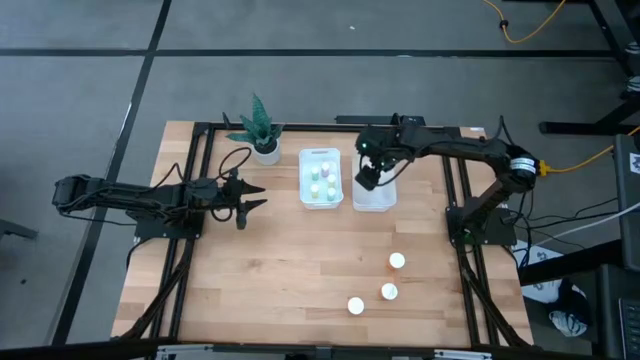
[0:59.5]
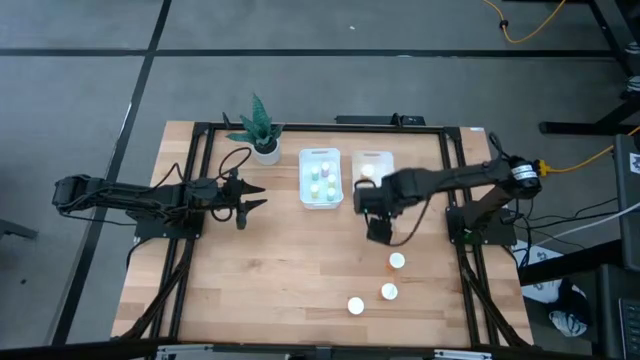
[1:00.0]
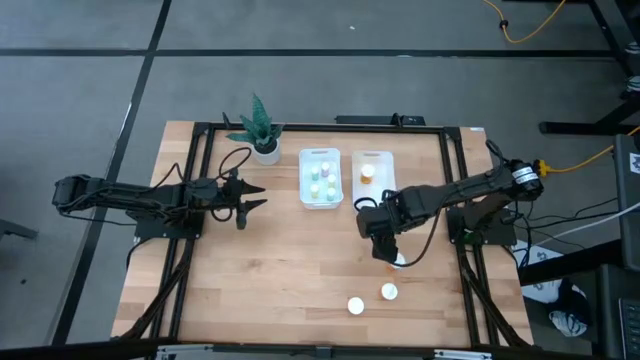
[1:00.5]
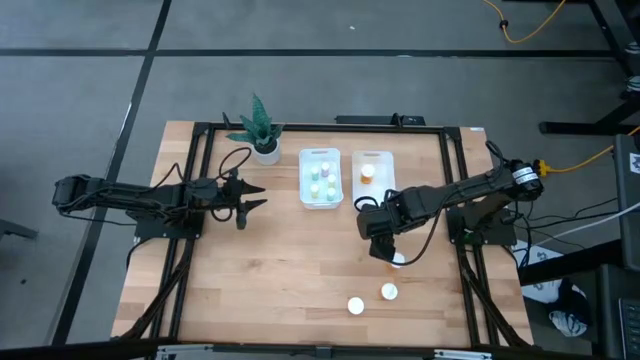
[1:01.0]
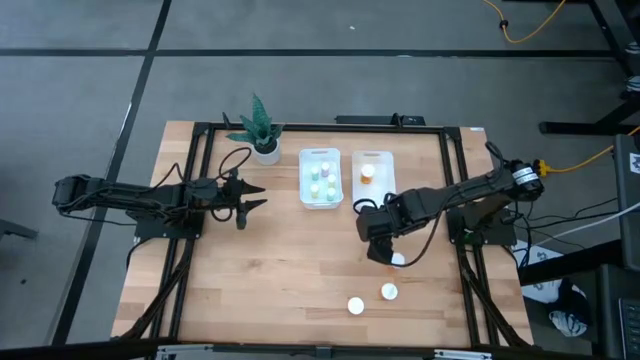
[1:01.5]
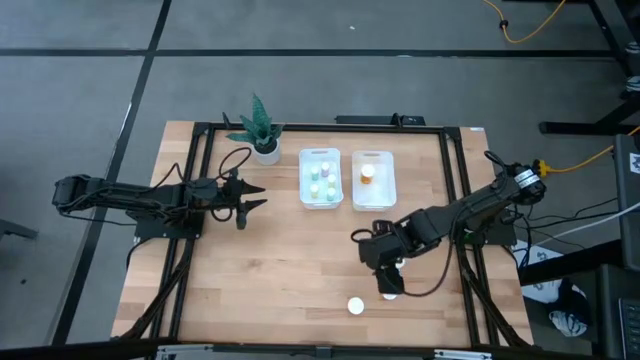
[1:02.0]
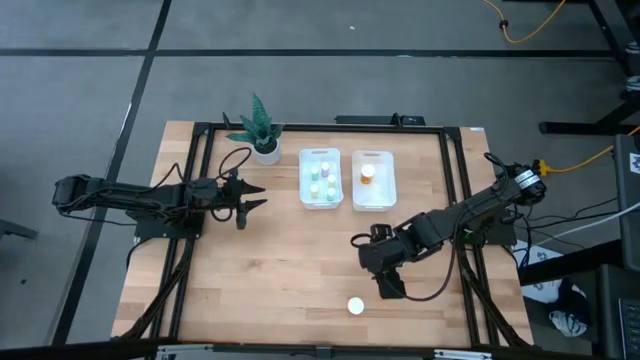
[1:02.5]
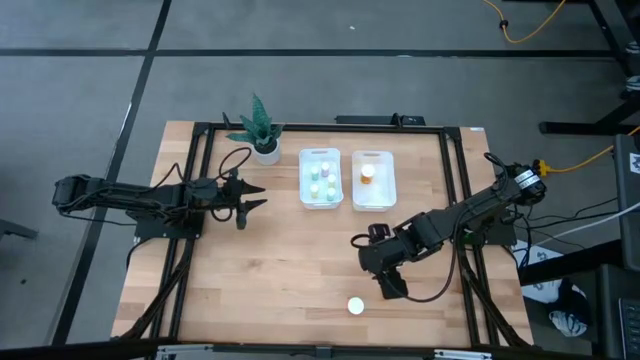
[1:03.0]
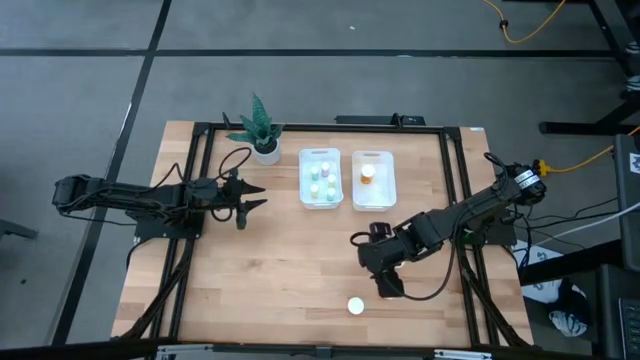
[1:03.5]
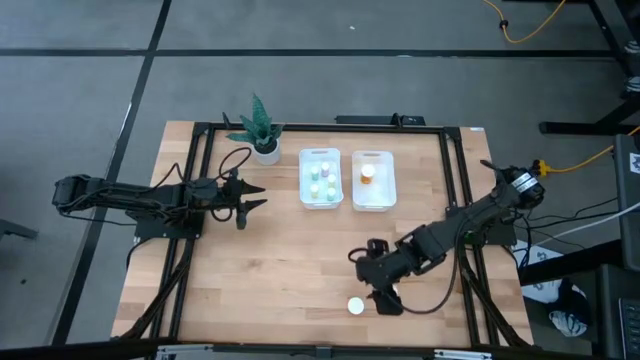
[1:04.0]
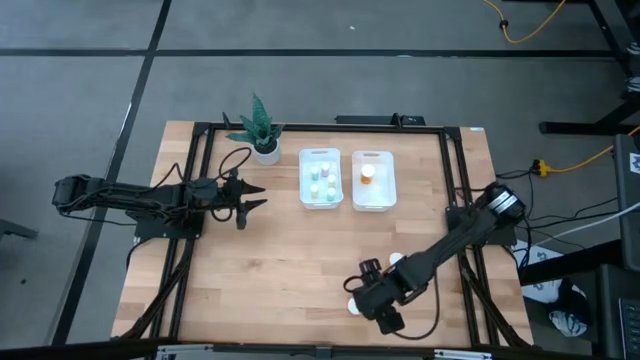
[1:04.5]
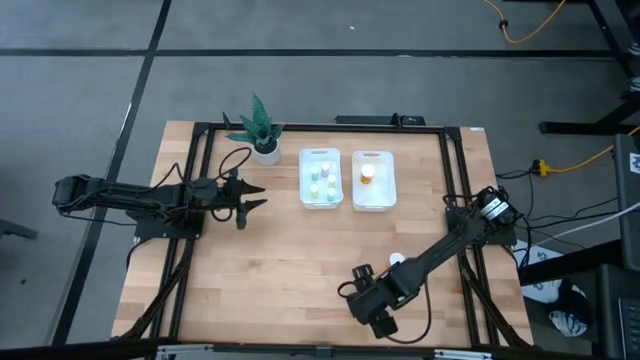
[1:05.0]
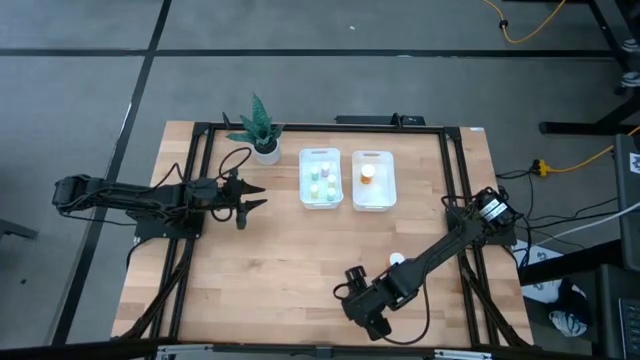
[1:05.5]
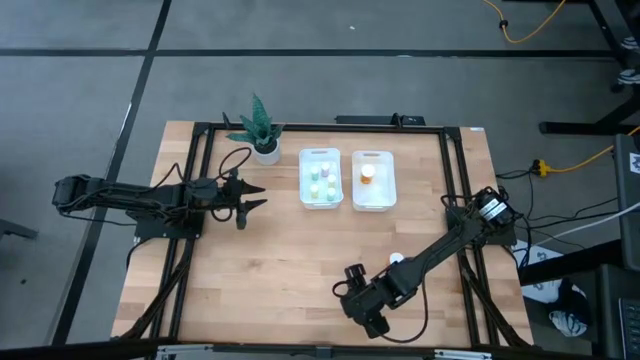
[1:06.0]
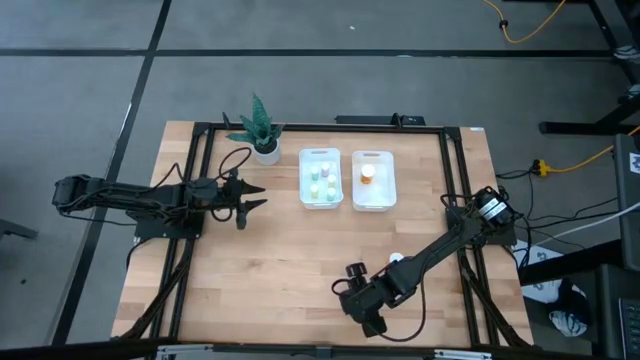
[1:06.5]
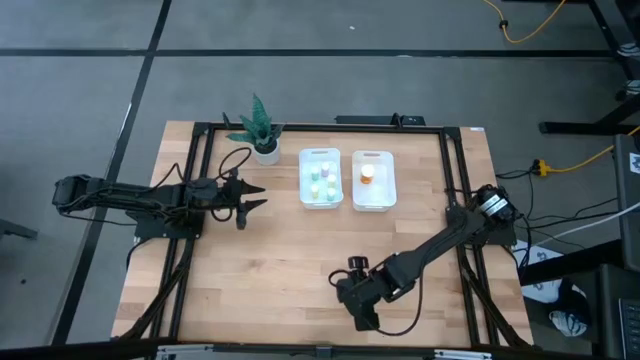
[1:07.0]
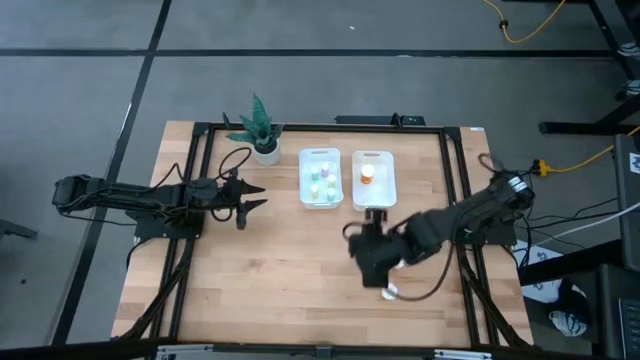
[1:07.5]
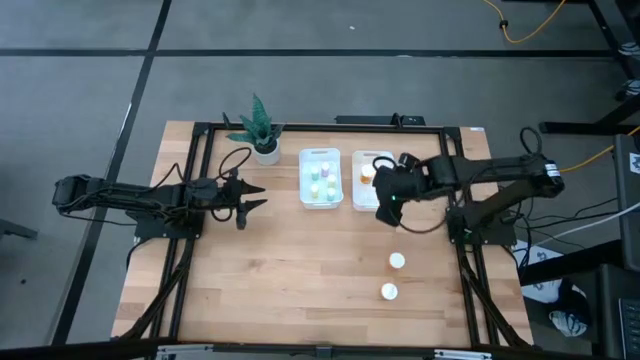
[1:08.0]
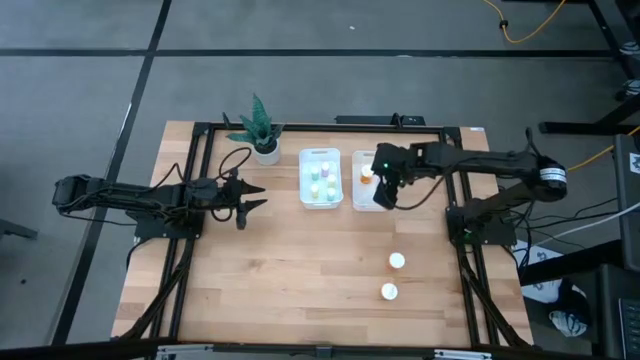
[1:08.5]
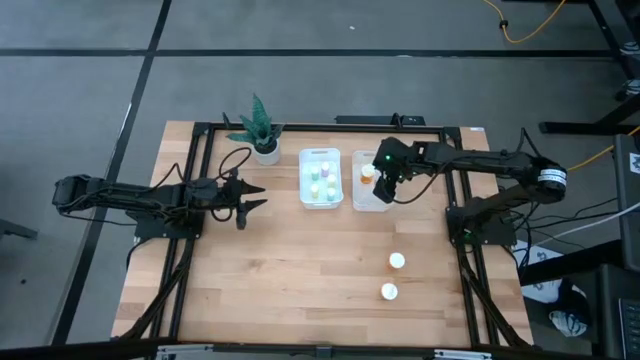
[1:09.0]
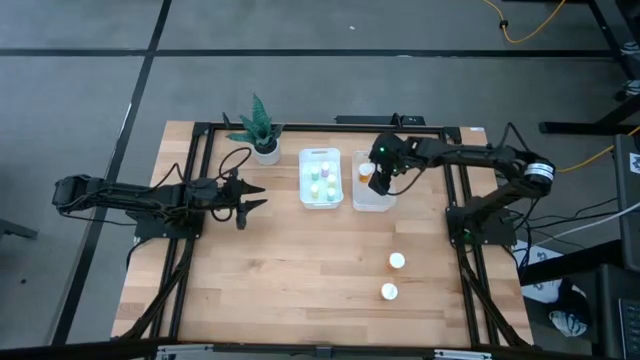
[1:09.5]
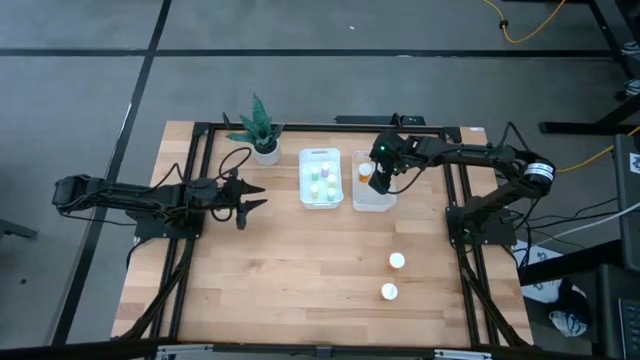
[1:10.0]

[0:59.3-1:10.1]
Task: Pick and place medicine bottles into bin by pill shape (circle, oval)
Put the orange pill bottle into the right white bin

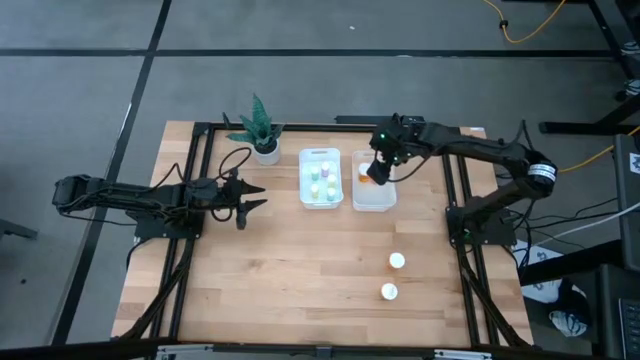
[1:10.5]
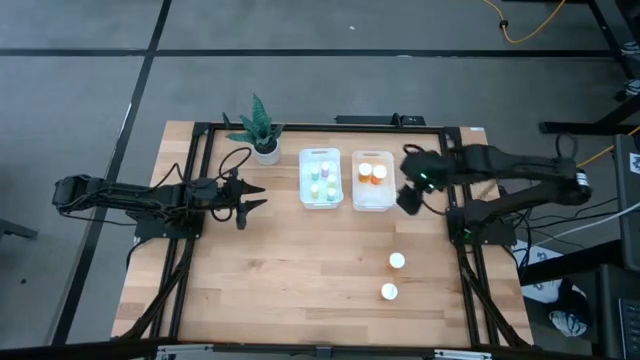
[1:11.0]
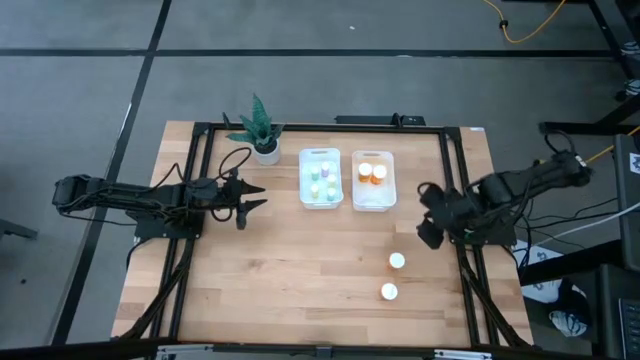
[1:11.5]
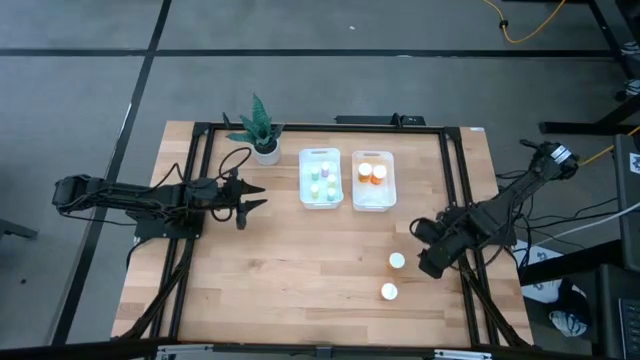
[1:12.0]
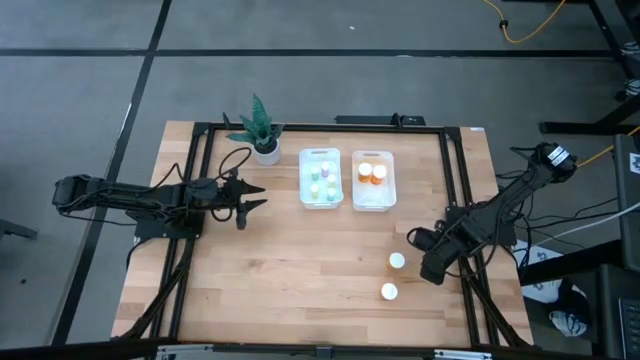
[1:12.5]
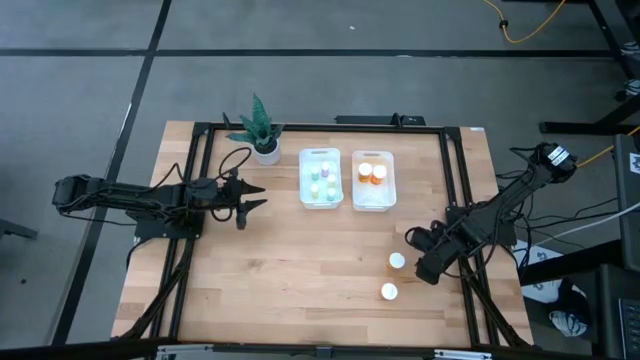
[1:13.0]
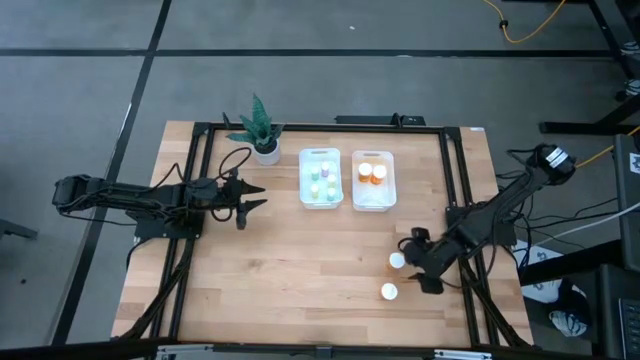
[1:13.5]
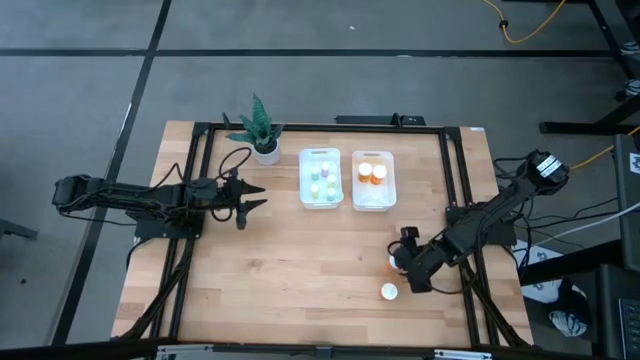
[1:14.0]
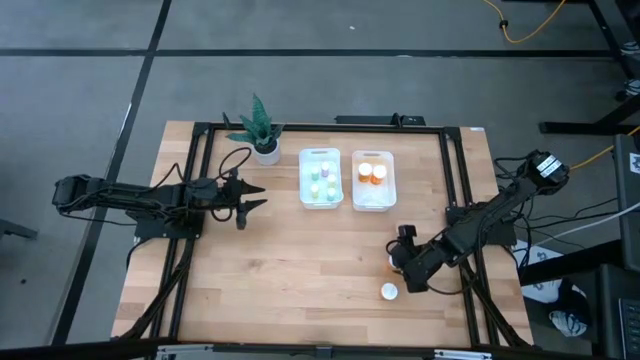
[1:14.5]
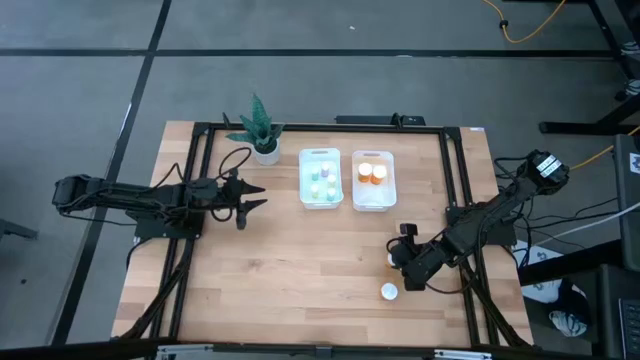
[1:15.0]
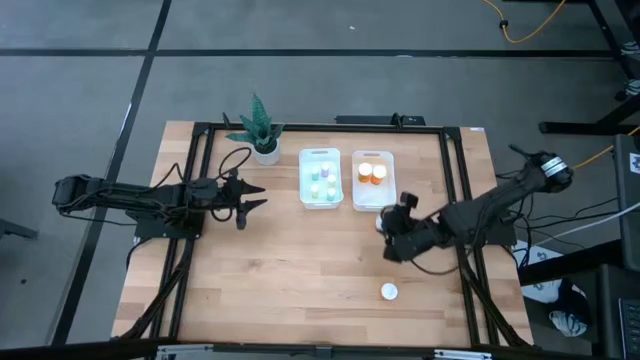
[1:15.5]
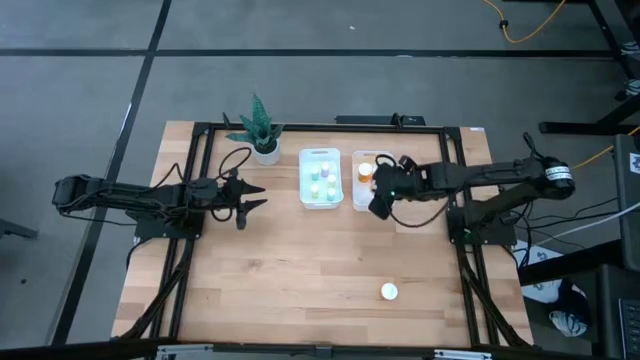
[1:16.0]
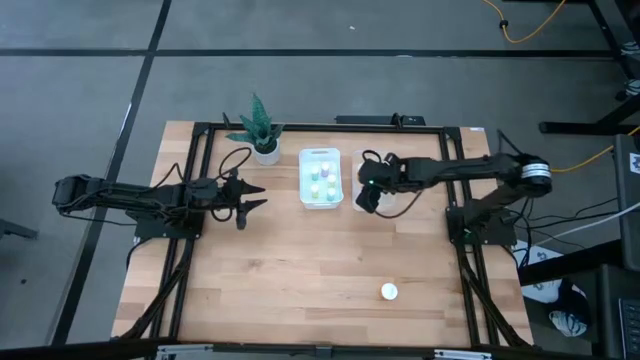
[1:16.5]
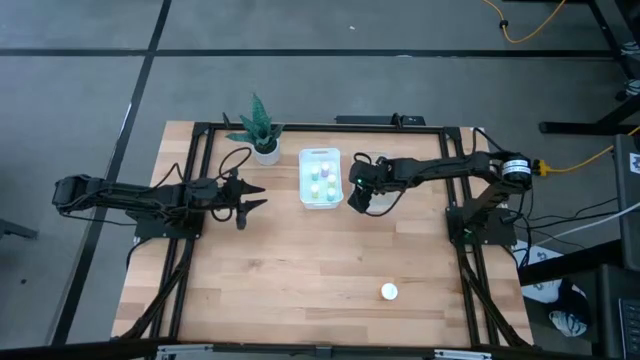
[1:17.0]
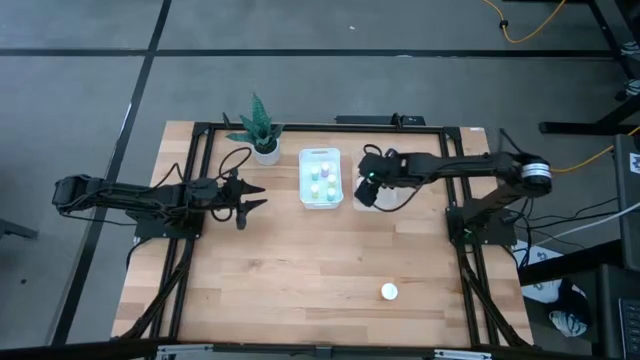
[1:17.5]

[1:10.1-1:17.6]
Put the orange pill bottle into the right white bin

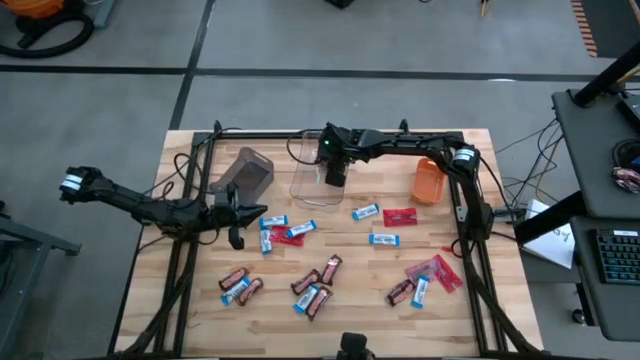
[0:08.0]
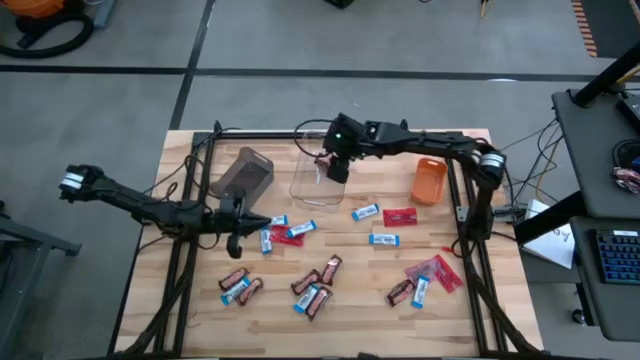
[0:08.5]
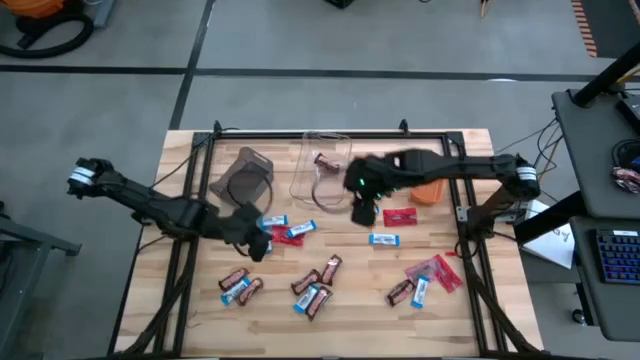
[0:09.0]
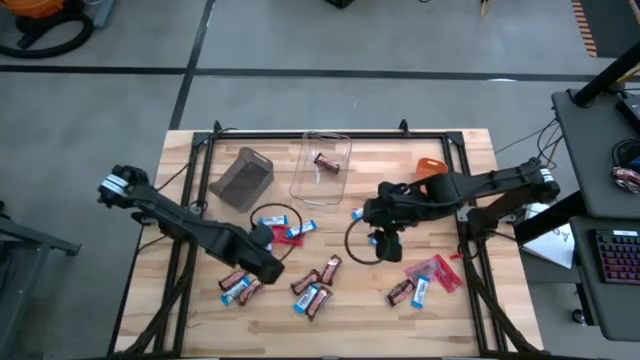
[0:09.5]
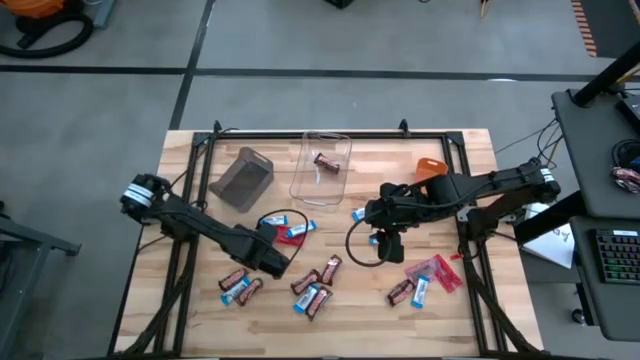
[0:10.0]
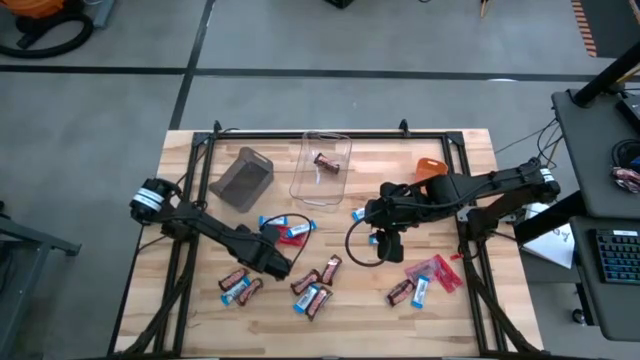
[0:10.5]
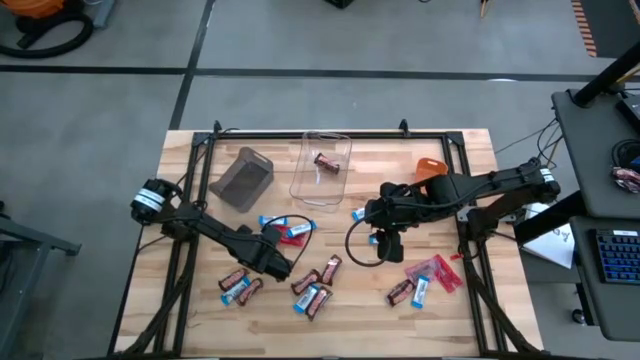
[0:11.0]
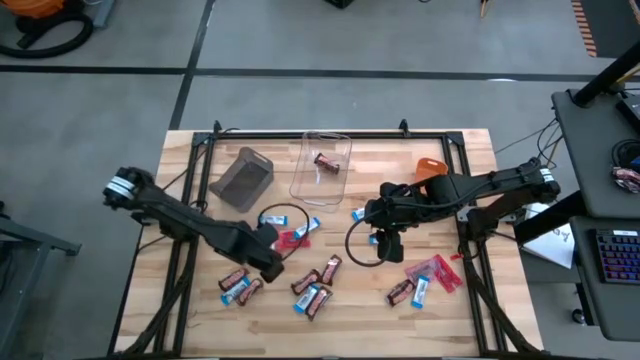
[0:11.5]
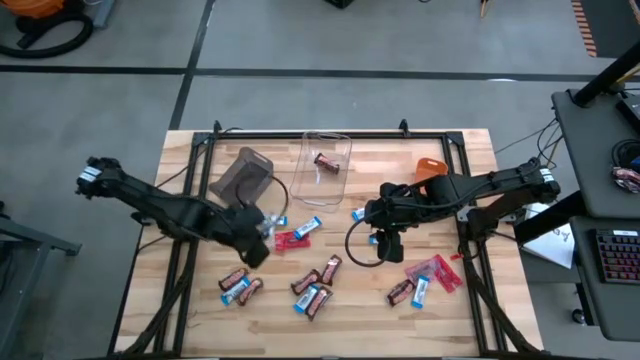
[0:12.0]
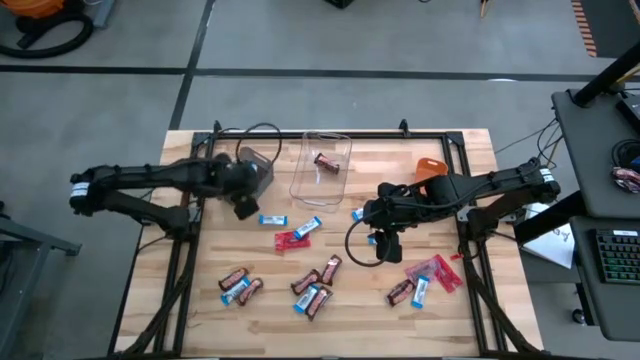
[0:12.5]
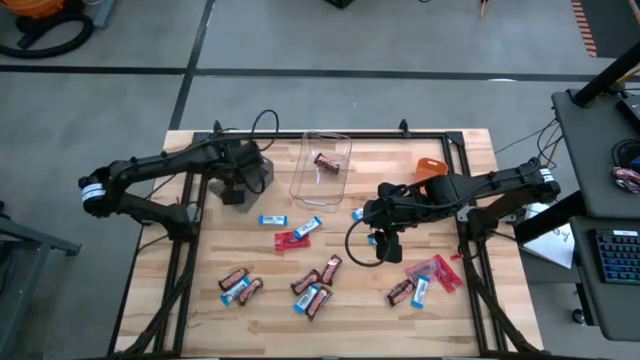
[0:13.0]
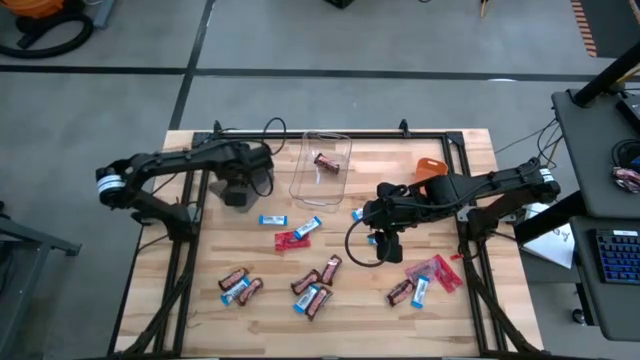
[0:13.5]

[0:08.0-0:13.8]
Task: Sort candy
Put the blue chocolate into the black bin
